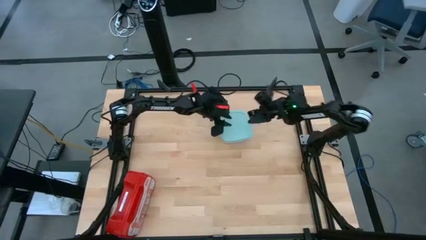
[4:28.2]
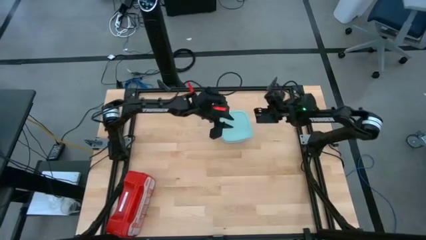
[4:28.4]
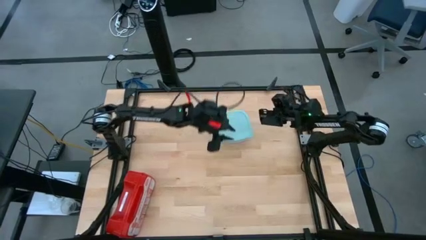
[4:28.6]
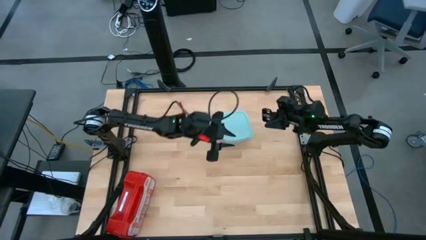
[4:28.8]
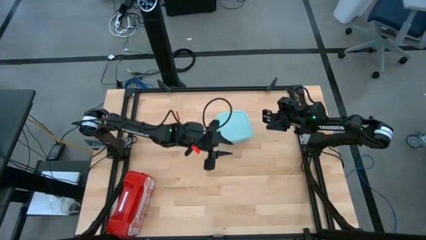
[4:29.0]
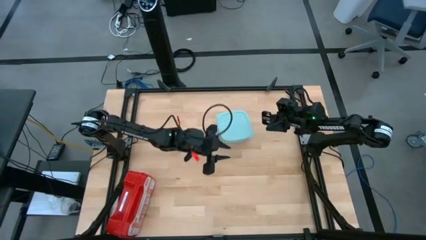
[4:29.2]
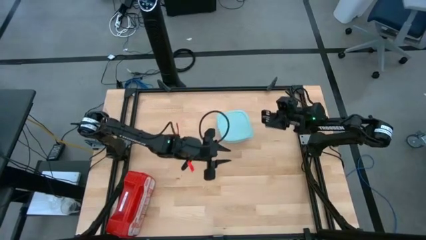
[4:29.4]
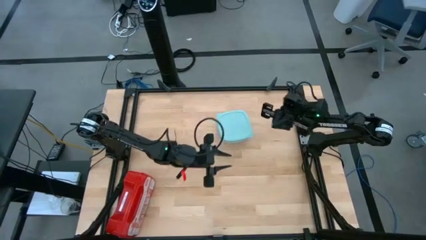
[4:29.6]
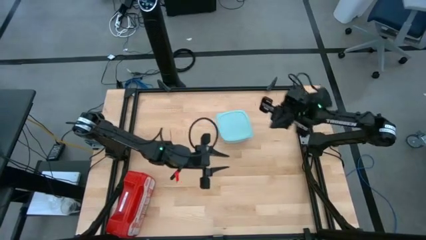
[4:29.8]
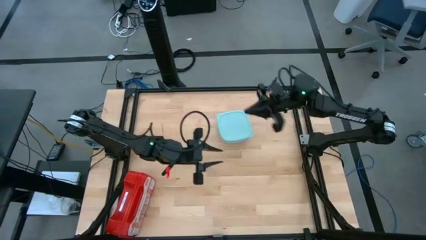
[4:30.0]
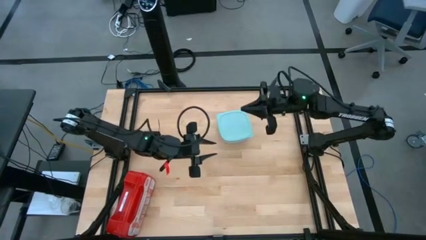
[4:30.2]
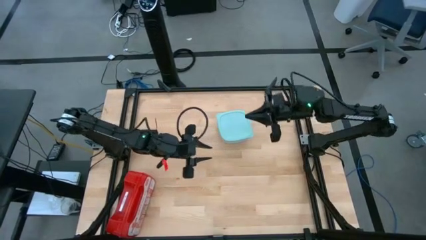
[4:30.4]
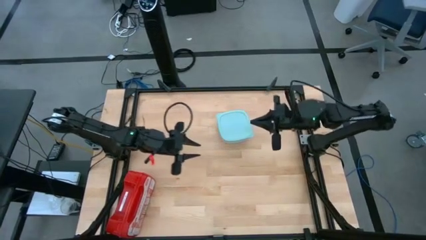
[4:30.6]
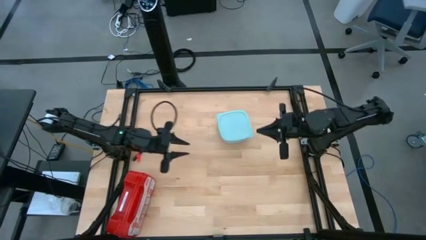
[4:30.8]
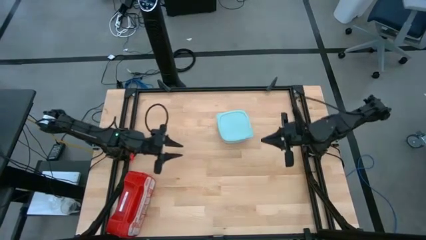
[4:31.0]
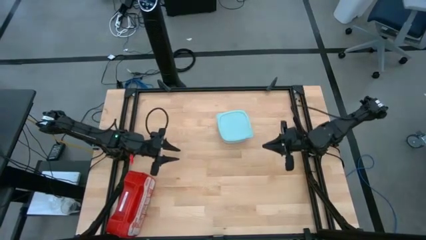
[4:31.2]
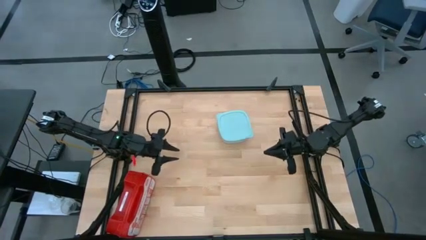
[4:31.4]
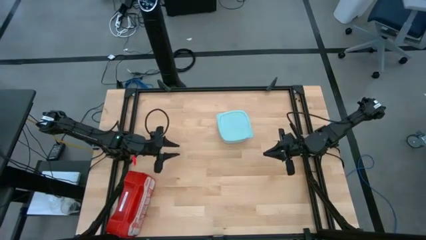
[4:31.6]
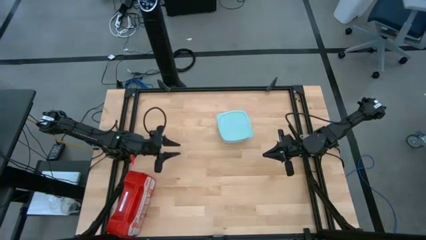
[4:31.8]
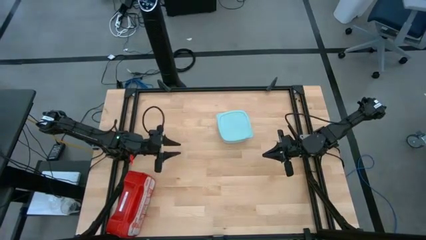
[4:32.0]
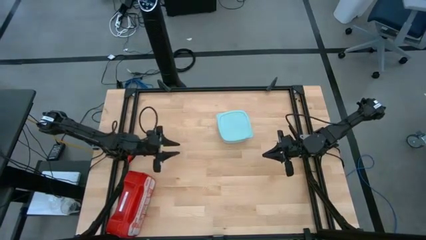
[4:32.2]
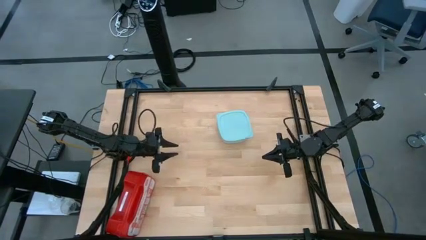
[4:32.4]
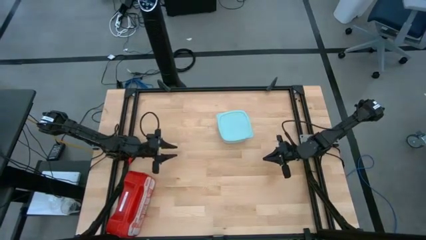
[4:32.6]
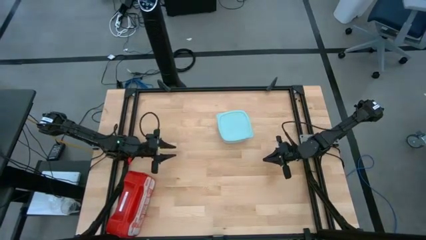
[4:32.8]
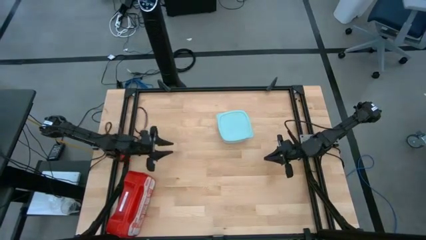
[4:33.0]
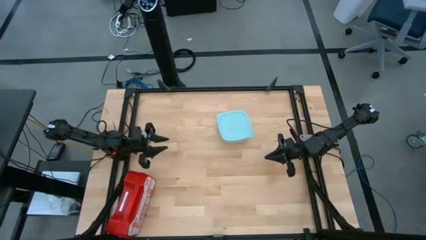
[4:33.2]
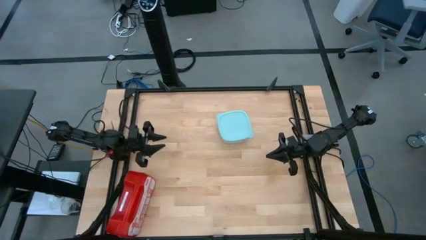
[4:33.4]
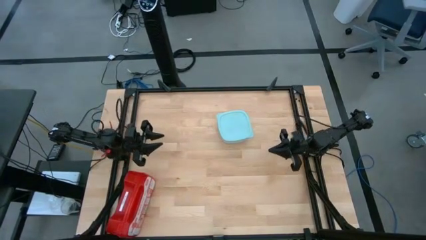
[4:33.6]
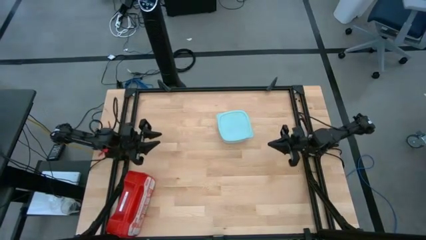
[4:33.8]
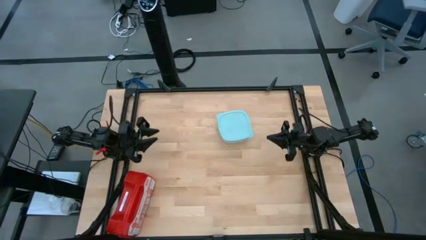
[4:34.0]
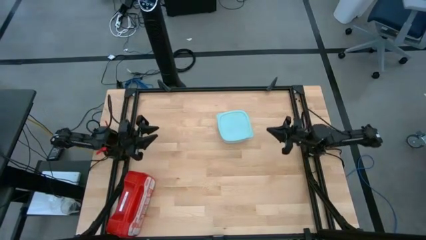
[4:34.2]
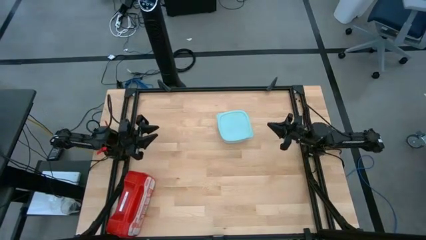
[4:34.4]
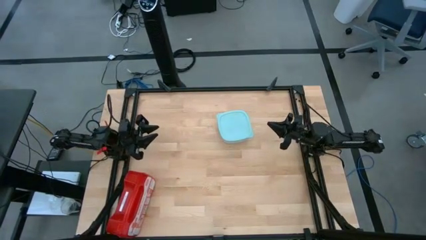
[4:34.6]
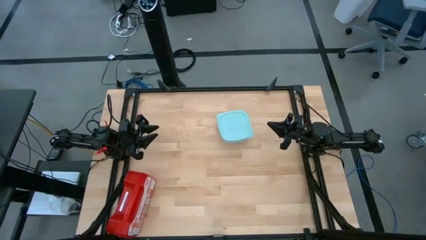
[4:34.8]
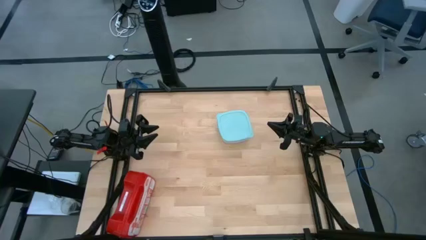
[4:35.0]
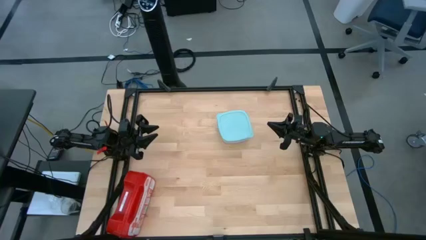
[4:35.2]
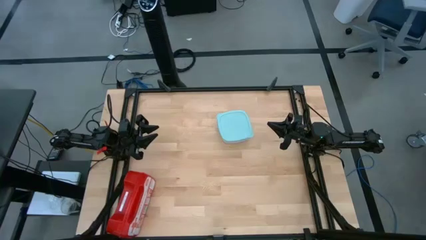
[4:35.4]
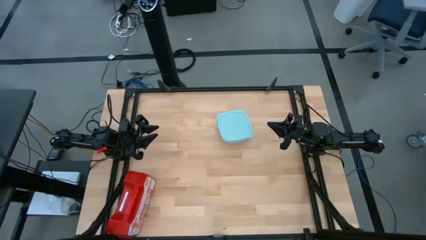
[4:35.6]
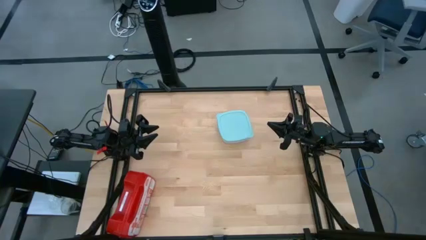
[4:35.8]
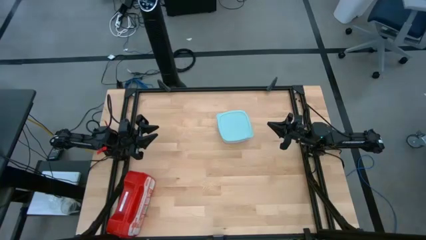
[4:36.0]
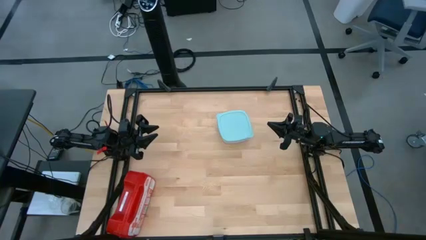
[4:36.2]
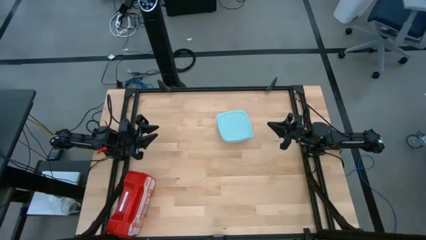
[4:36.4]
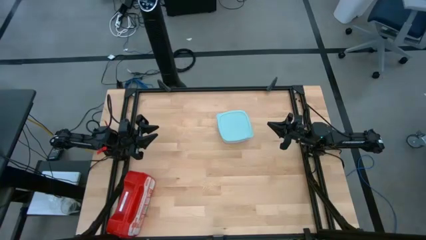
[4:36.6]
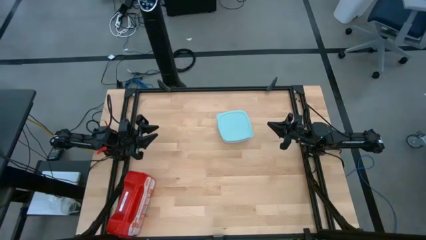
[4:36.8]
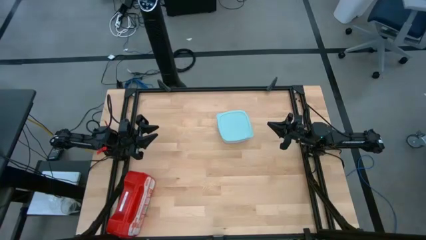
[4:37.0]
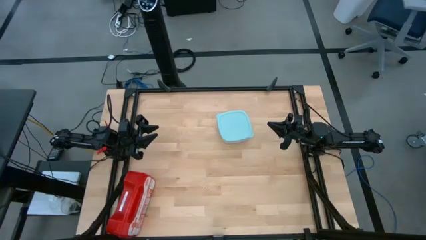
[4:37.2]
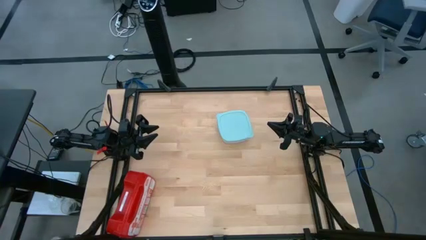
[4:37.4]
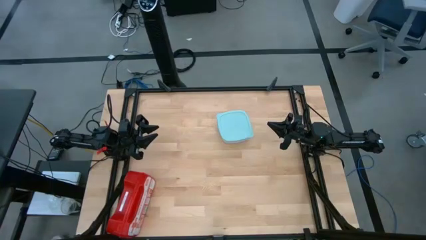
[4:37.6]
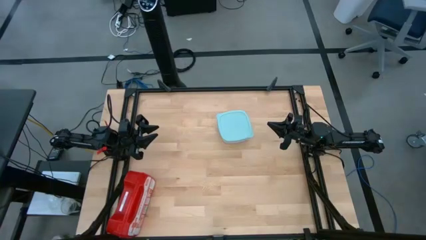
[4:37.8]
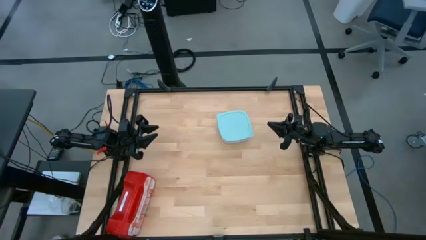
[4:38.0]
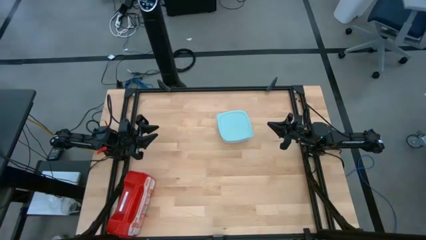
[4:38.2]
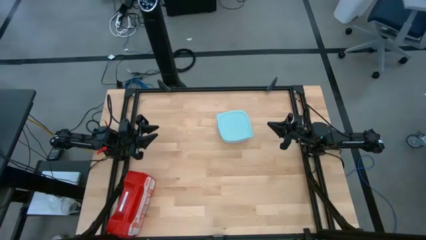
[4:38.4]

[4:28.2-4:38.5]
Task: Roll bandage
Return to Home Position
